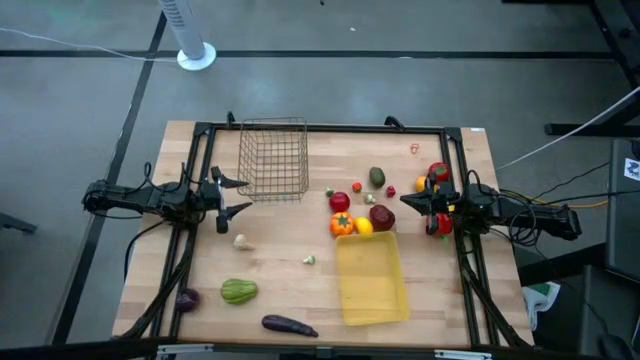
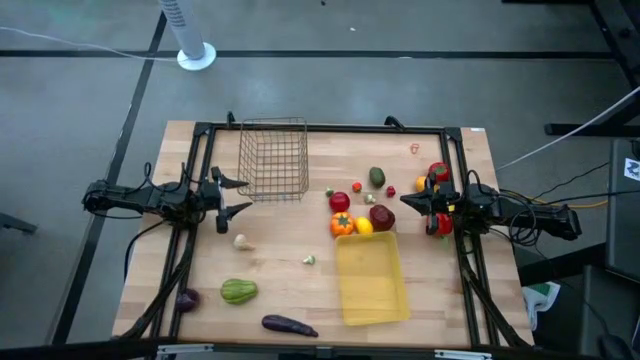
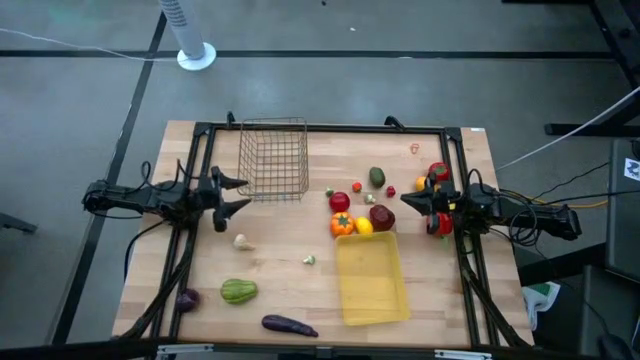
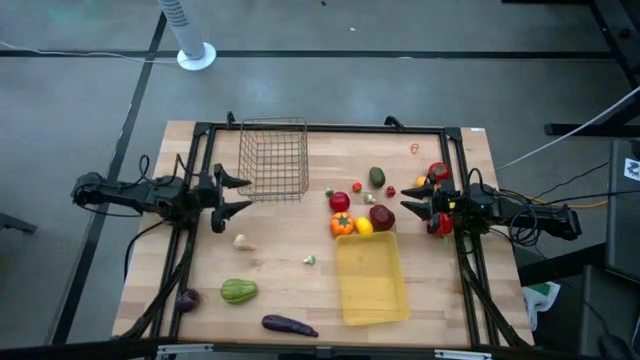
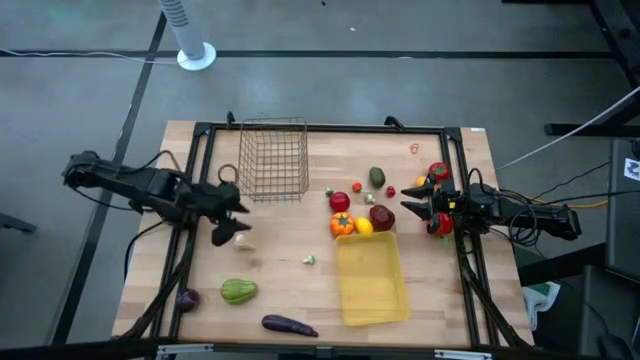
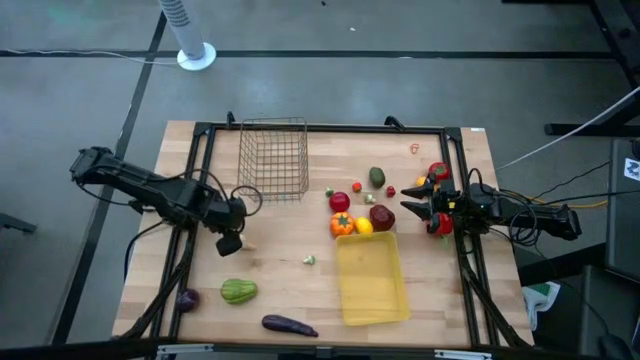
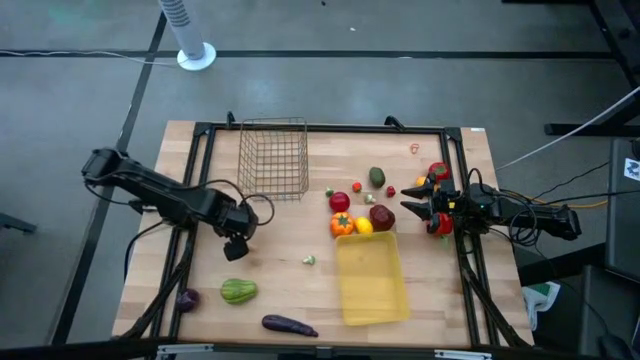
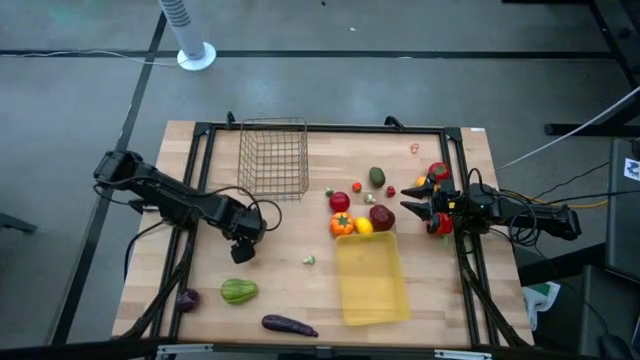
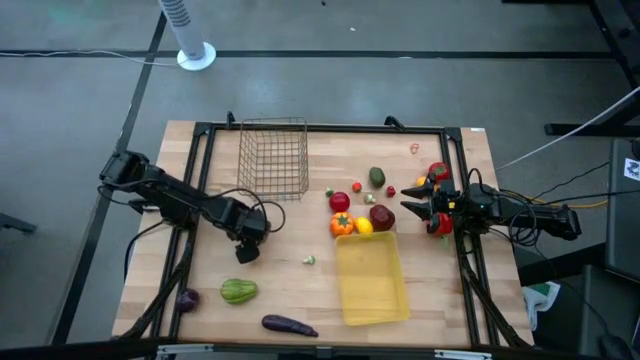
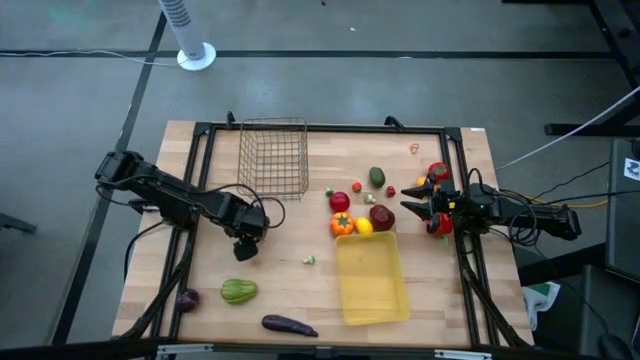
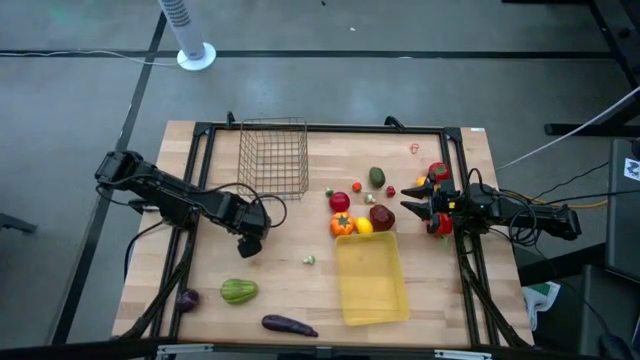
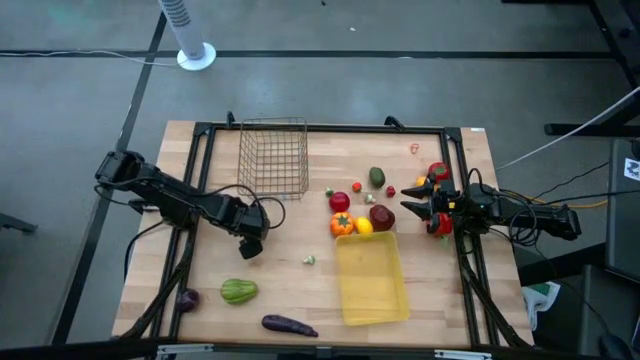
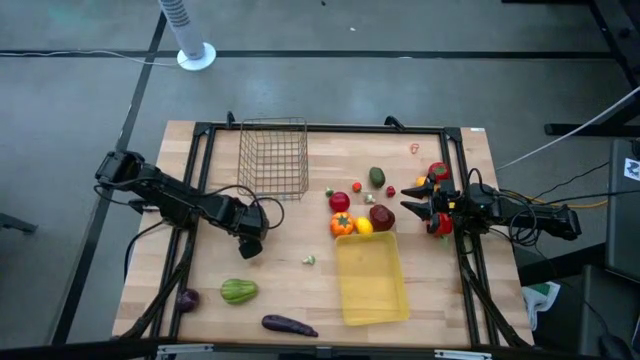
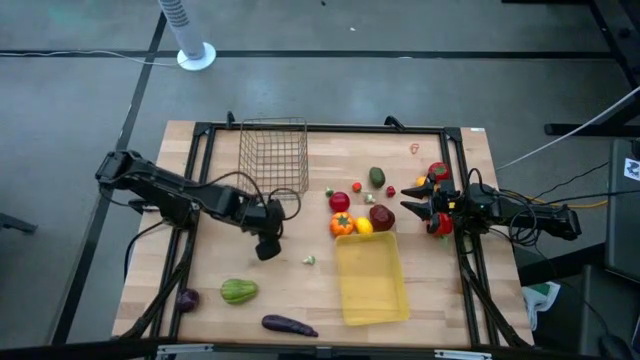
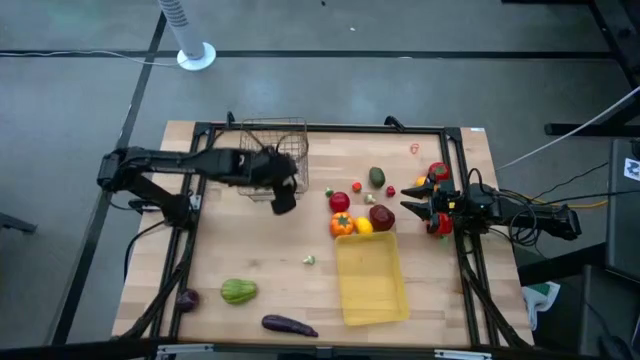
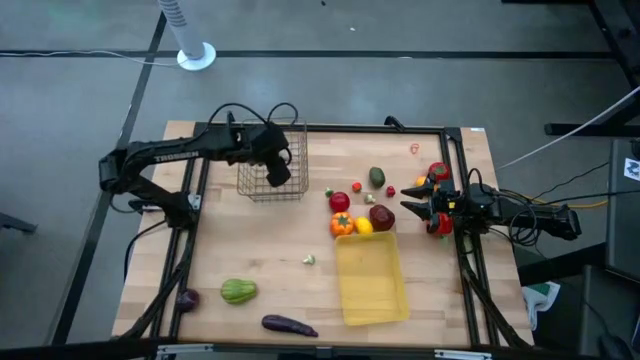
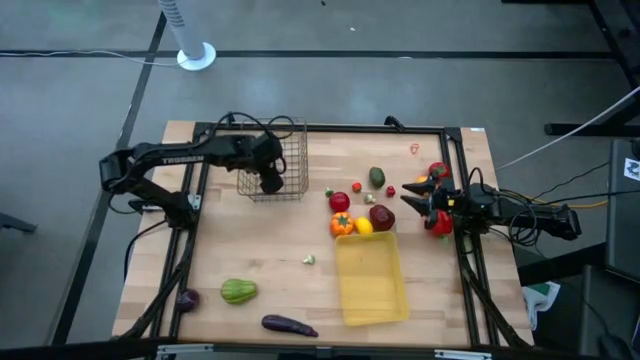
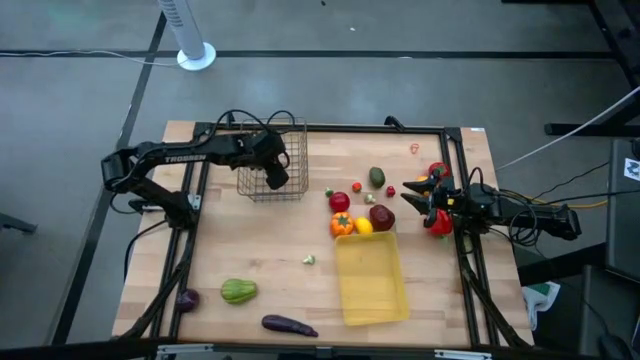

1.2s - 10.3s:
Task: Sort produce into baskets
Put the garlic into the brown wire basket

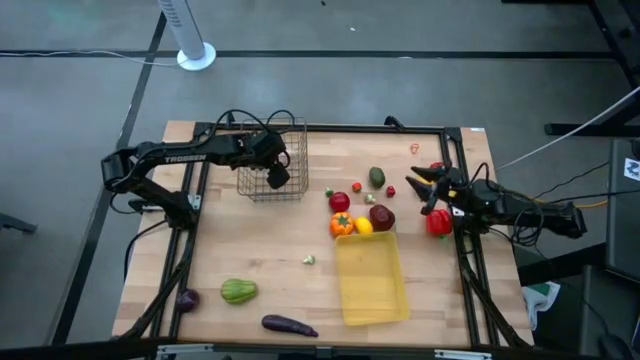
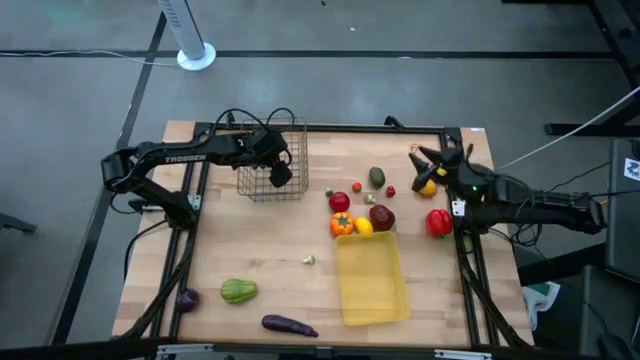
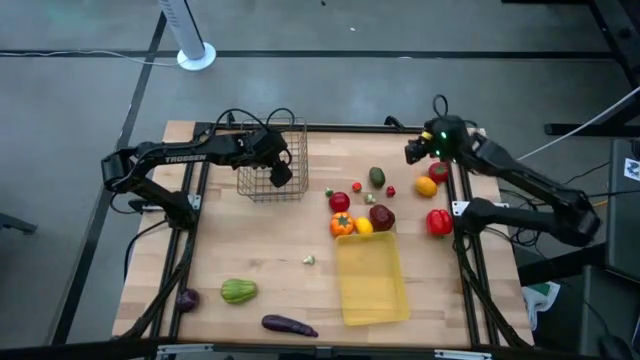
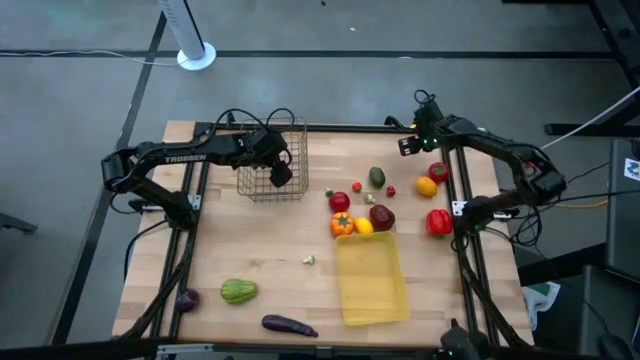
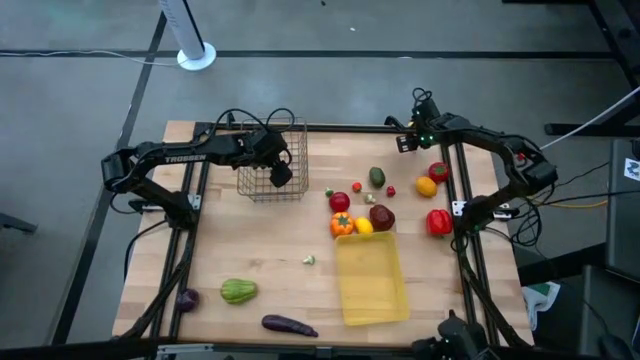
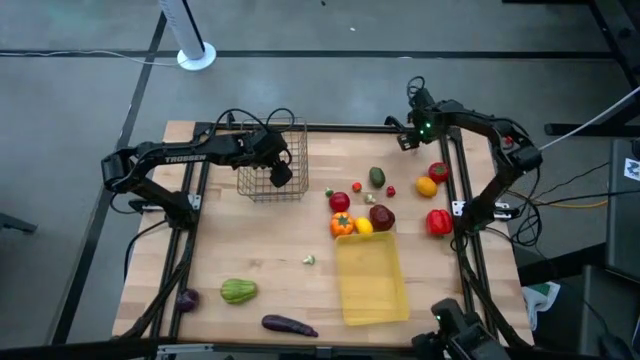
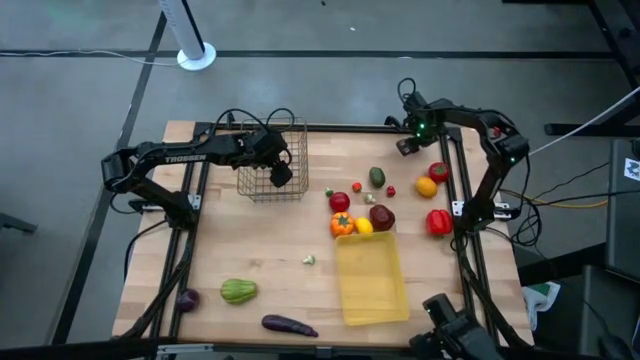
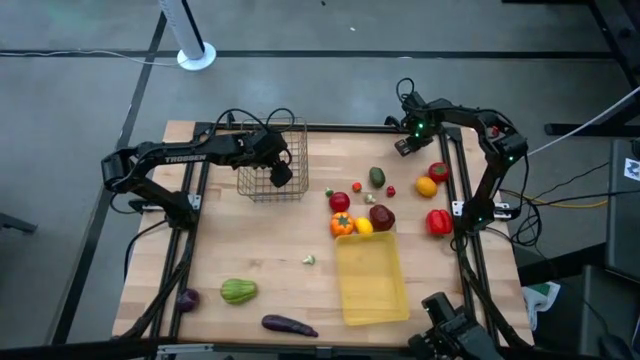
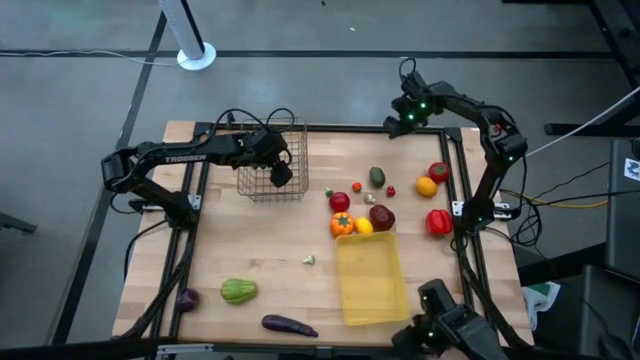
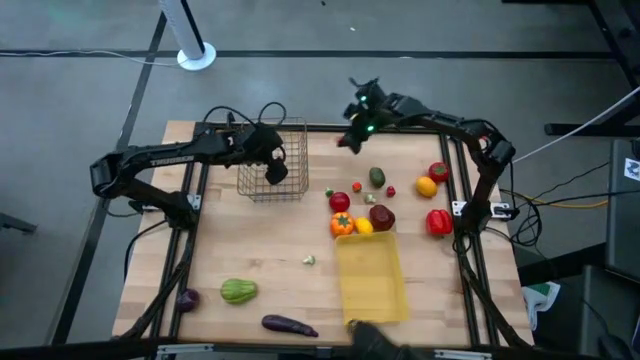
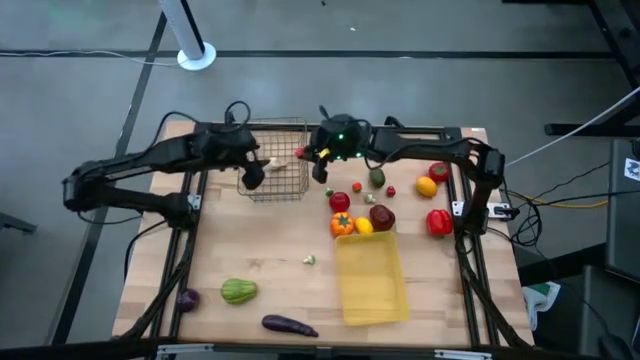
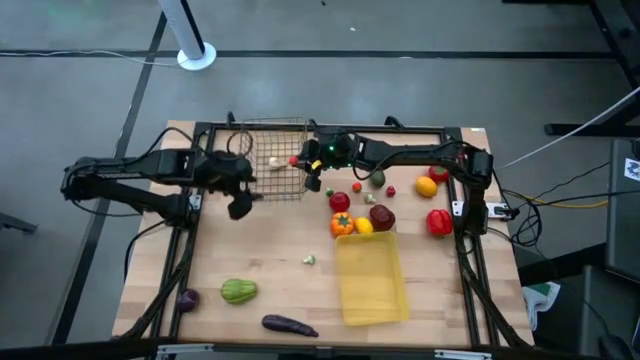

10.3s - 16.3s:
Put the orange mushroom into the brown wire basket

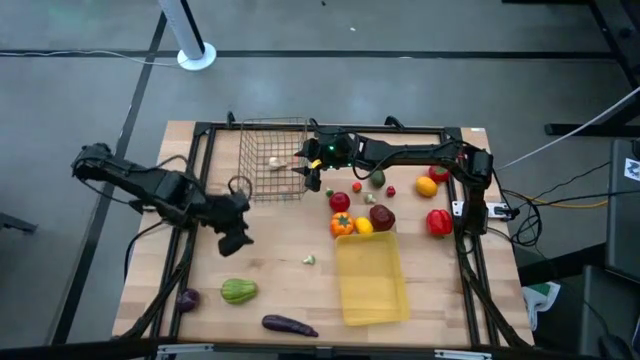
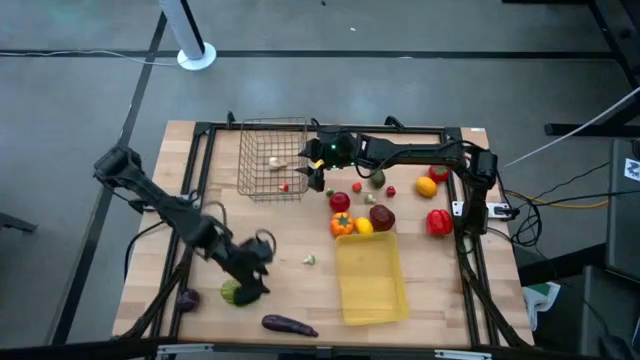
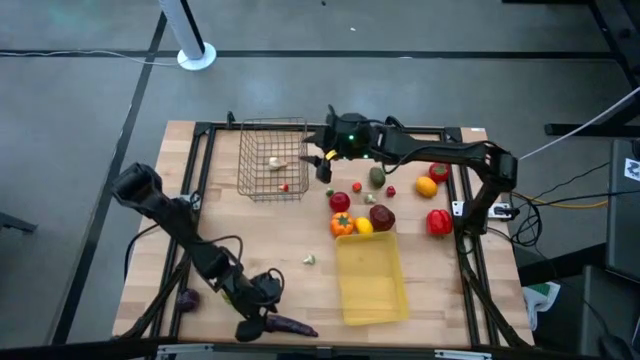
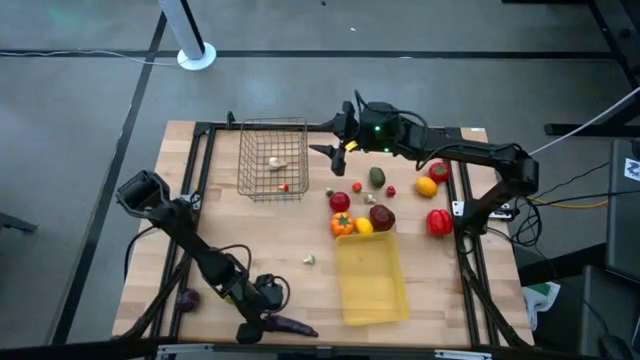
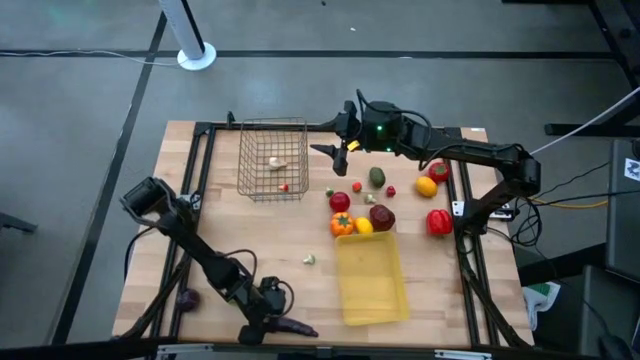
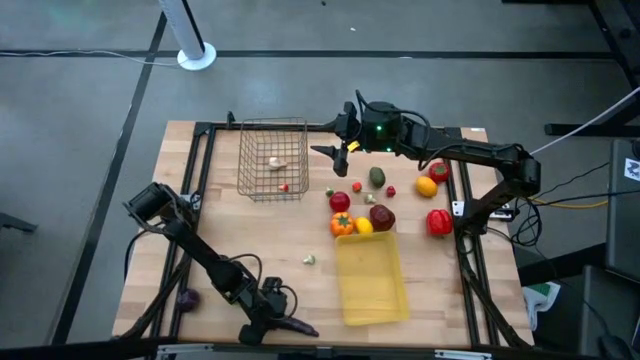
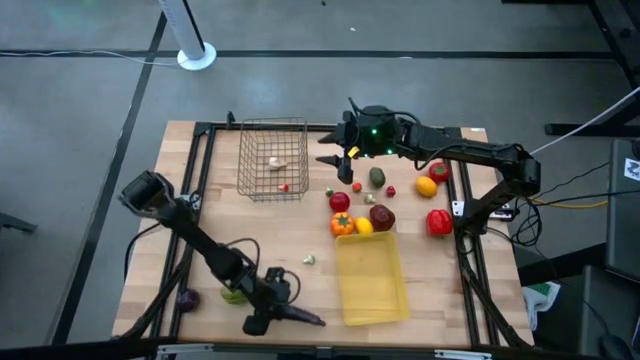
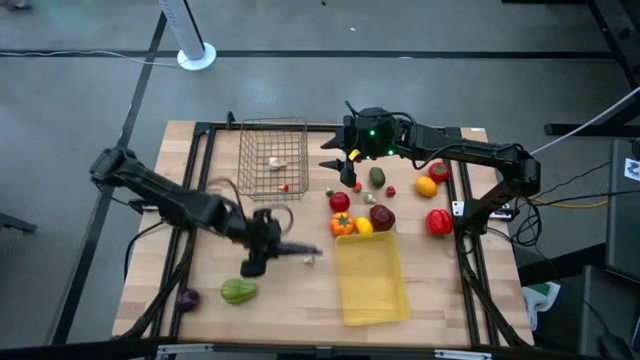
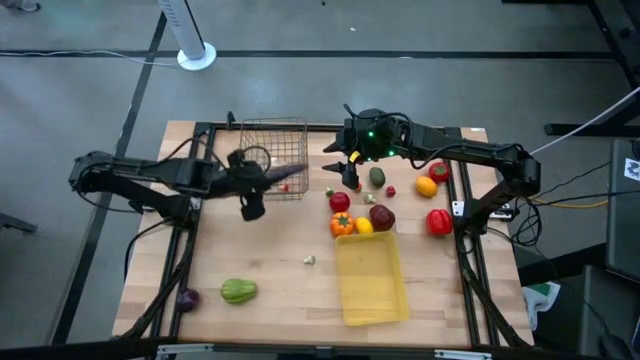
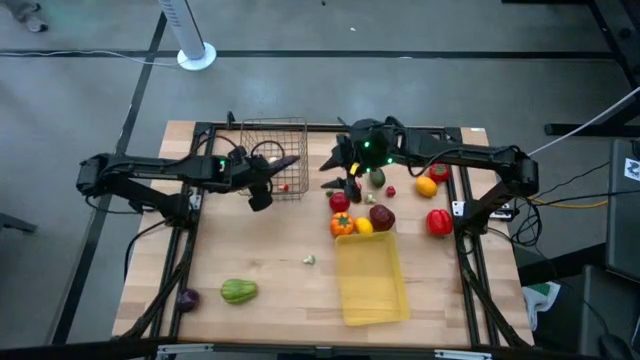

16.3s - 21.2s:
Put the eggplant into the brown wire basket
